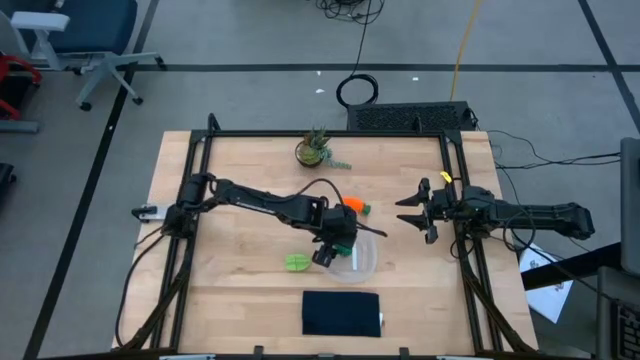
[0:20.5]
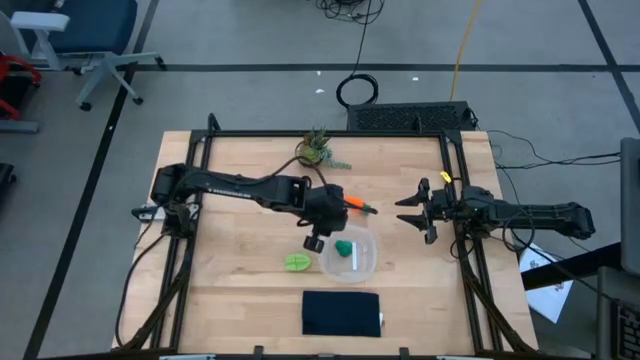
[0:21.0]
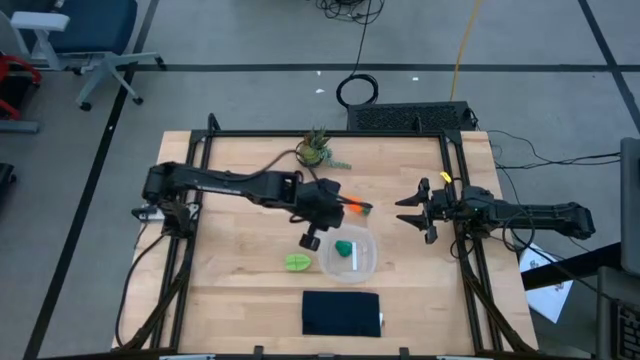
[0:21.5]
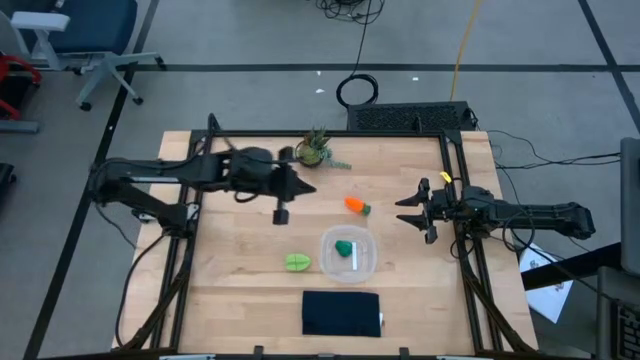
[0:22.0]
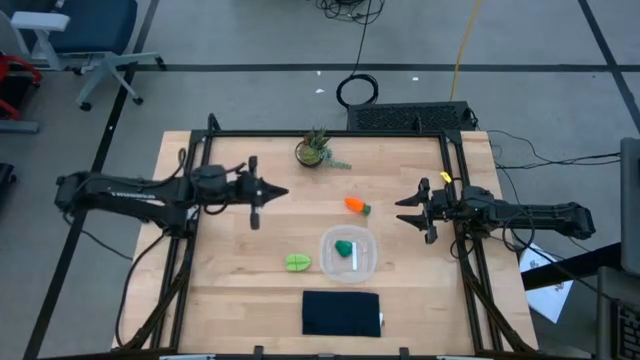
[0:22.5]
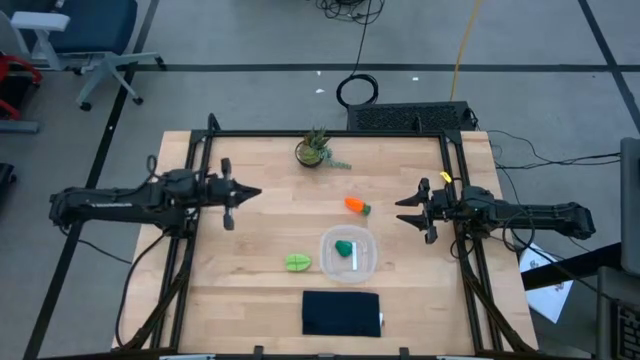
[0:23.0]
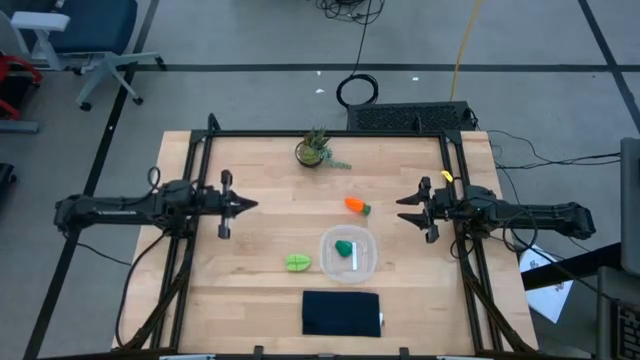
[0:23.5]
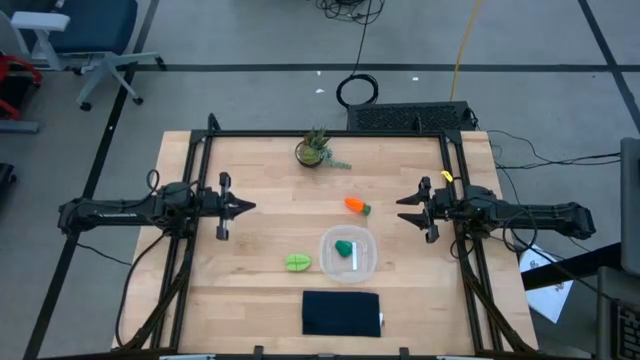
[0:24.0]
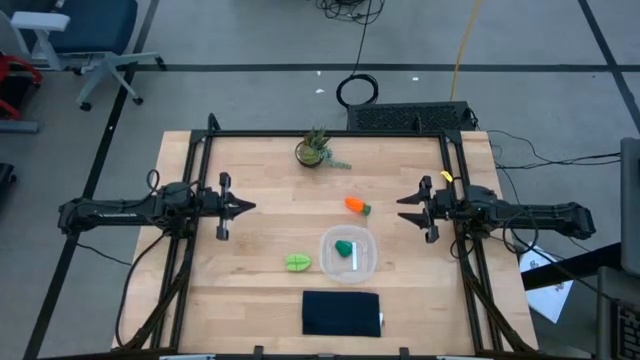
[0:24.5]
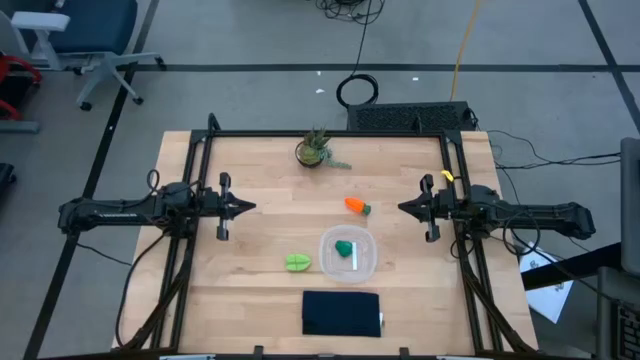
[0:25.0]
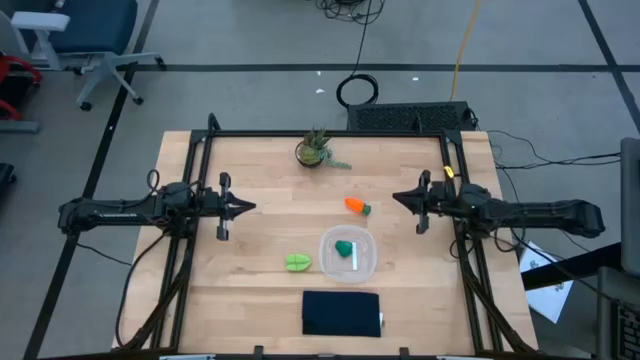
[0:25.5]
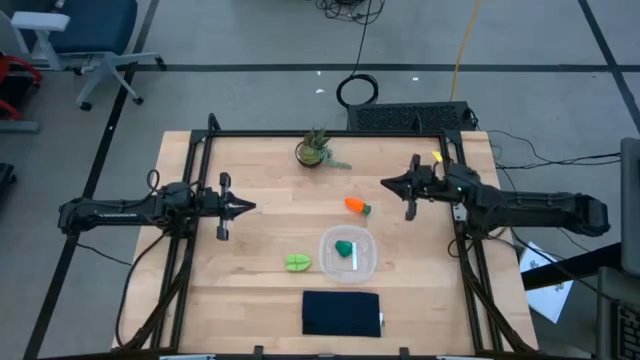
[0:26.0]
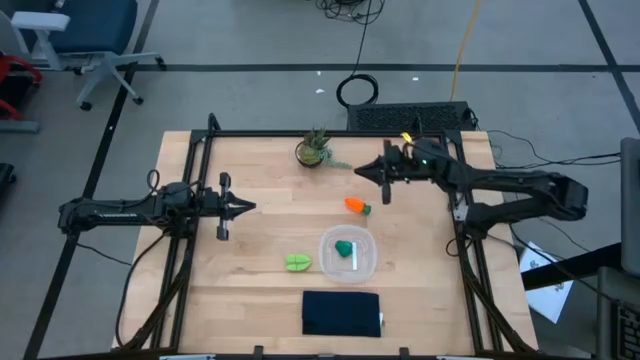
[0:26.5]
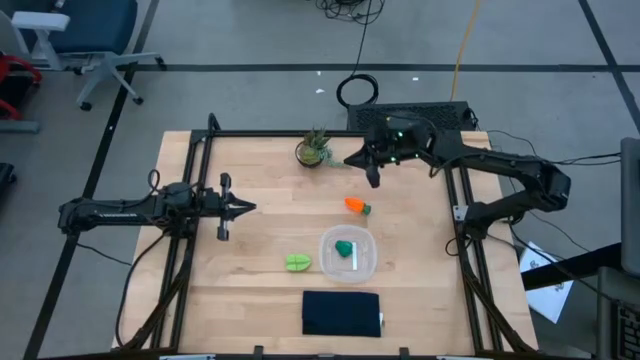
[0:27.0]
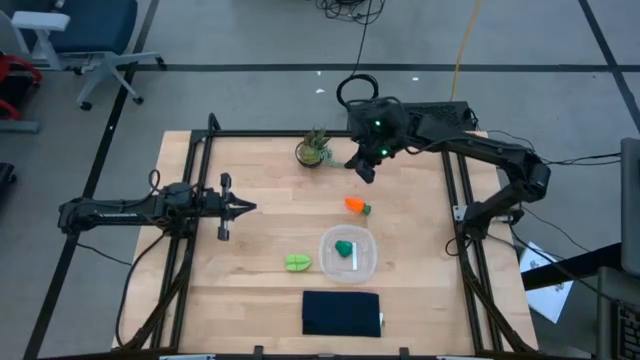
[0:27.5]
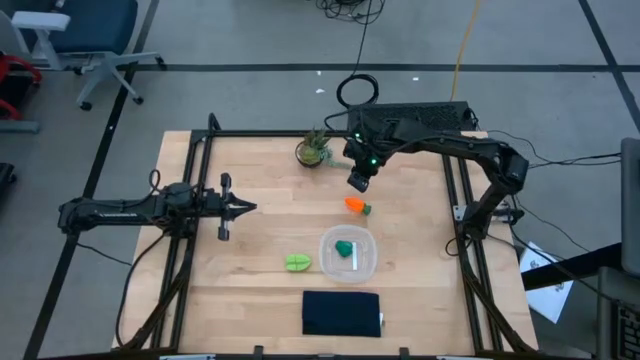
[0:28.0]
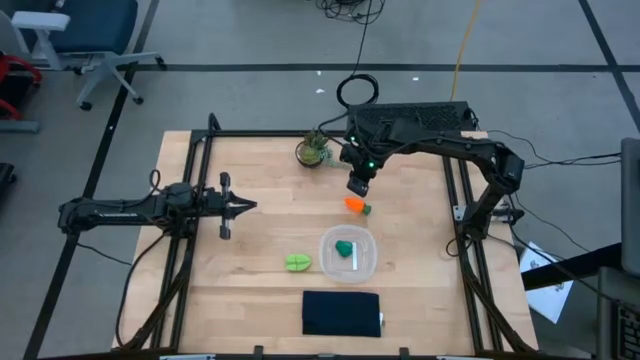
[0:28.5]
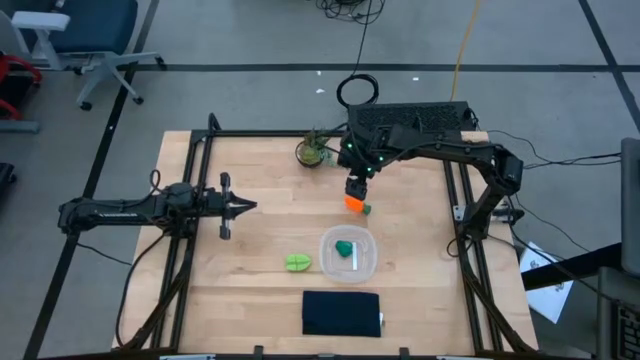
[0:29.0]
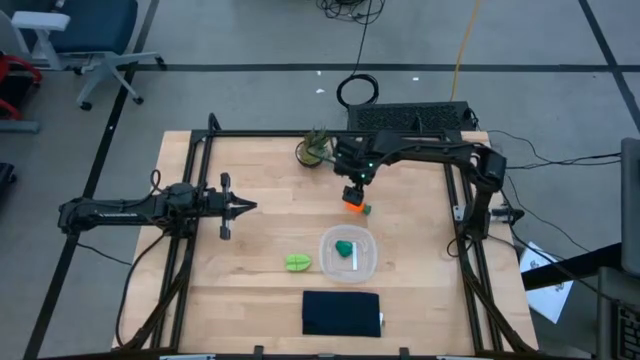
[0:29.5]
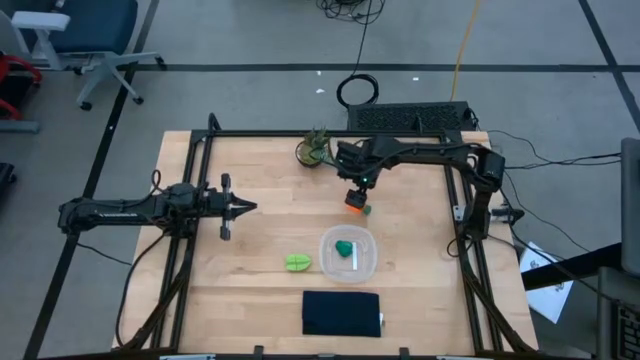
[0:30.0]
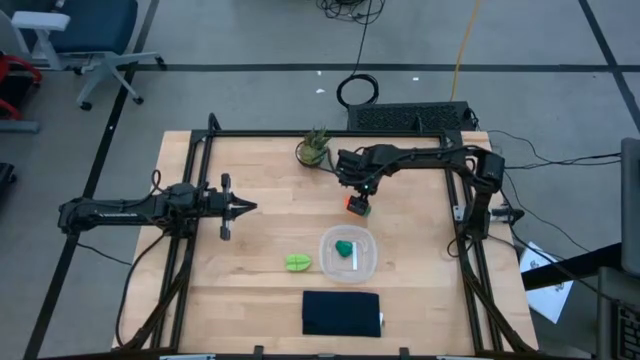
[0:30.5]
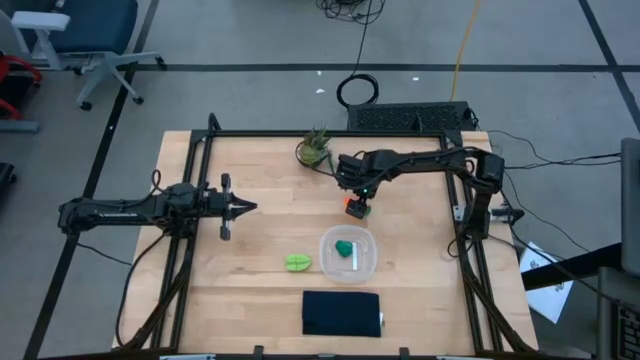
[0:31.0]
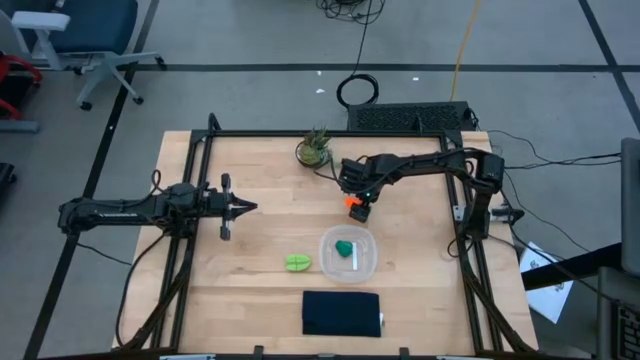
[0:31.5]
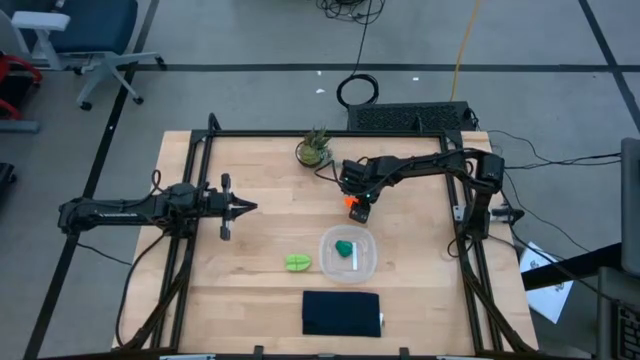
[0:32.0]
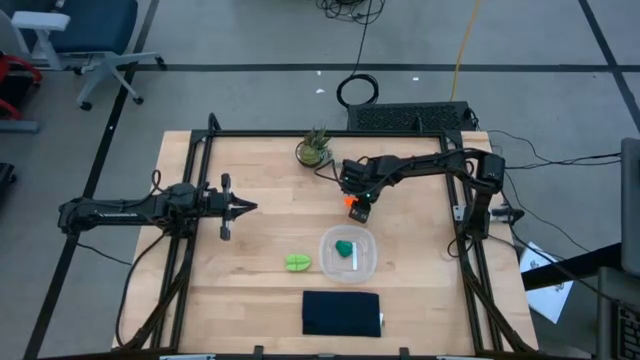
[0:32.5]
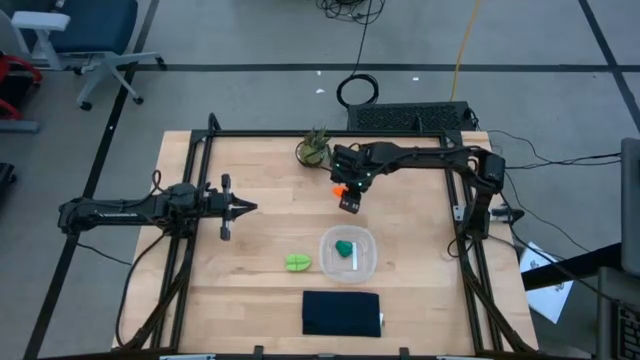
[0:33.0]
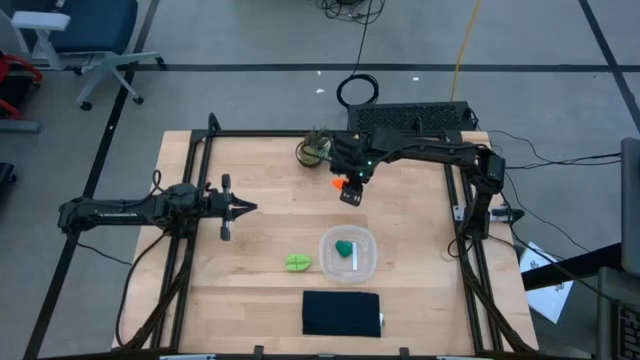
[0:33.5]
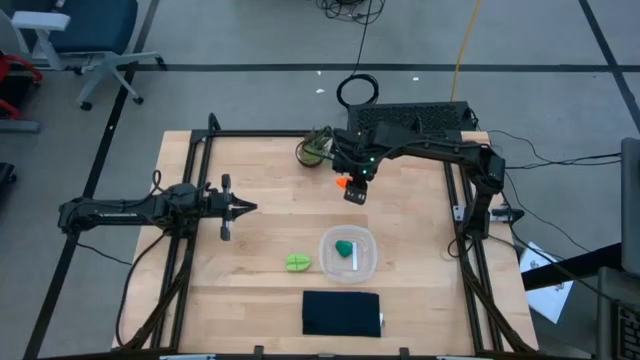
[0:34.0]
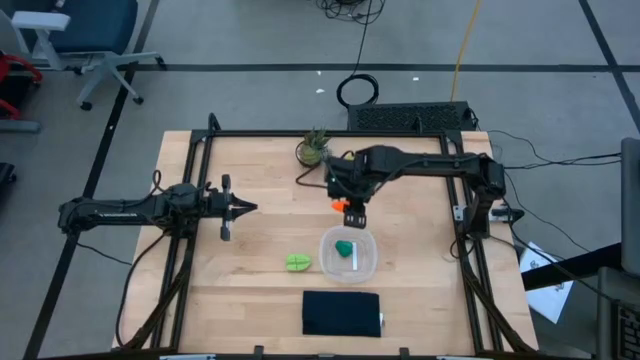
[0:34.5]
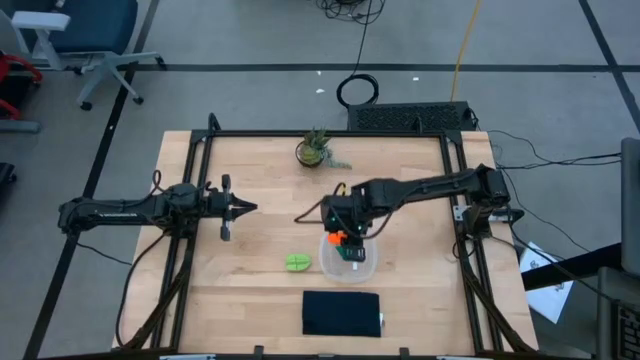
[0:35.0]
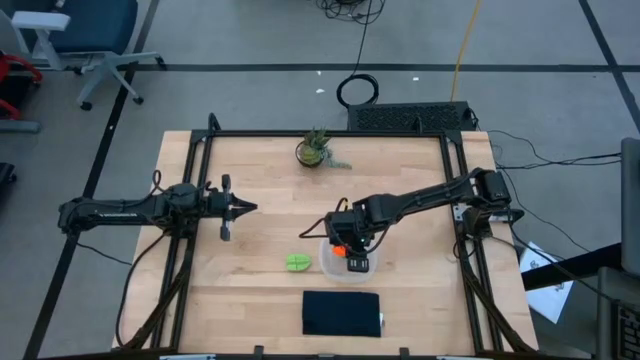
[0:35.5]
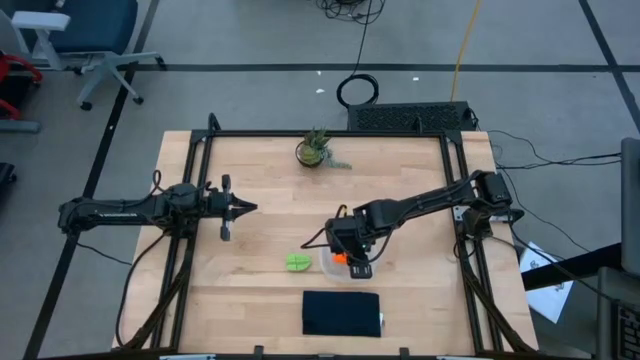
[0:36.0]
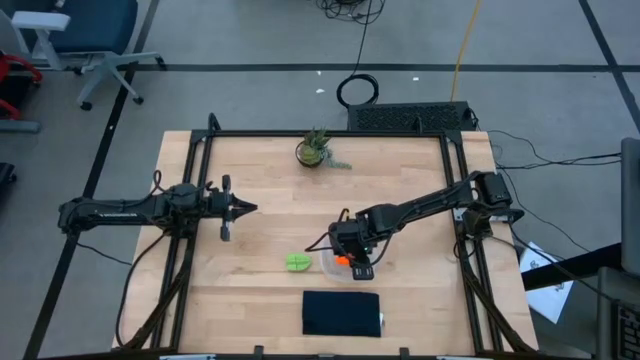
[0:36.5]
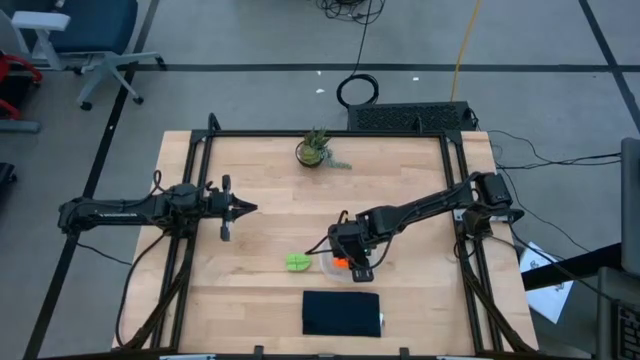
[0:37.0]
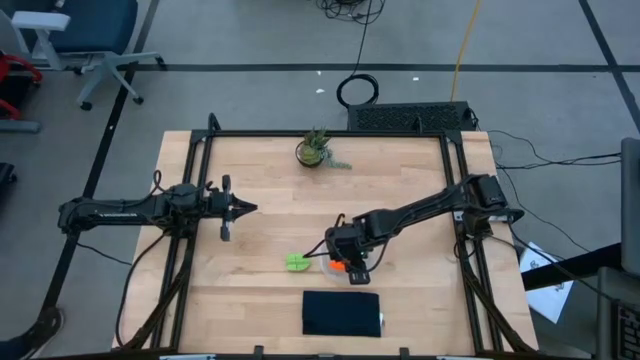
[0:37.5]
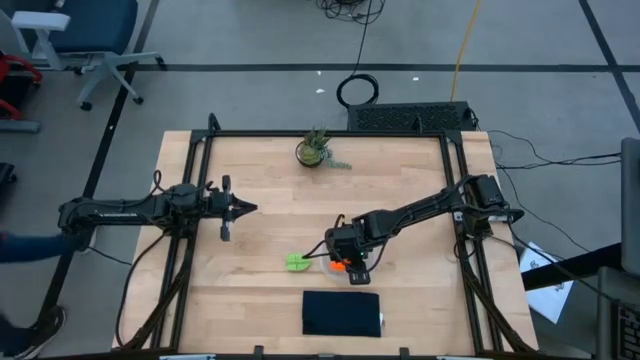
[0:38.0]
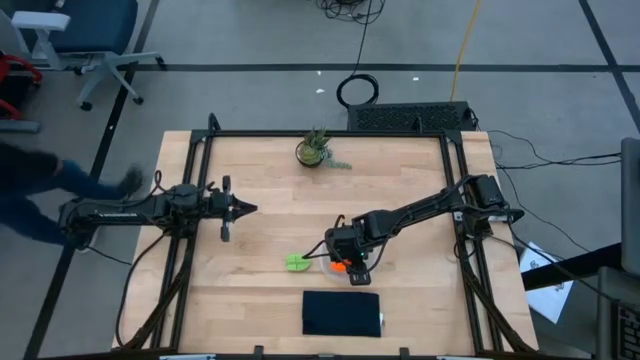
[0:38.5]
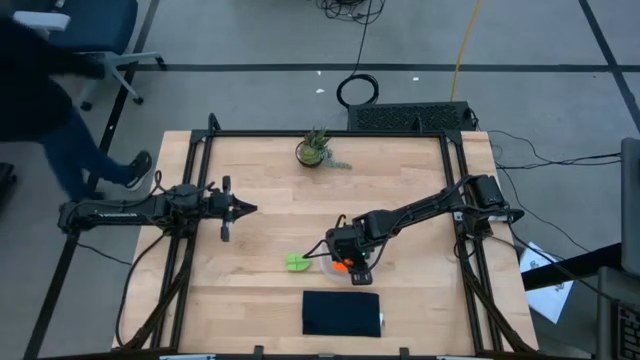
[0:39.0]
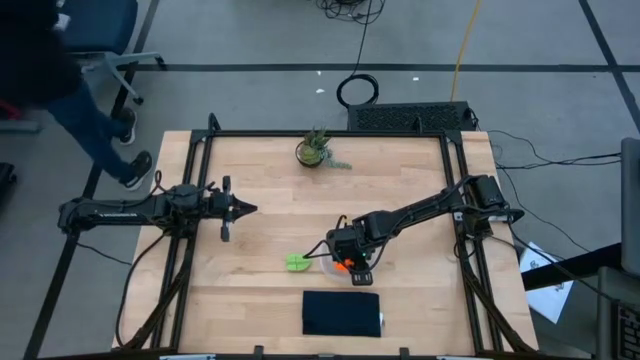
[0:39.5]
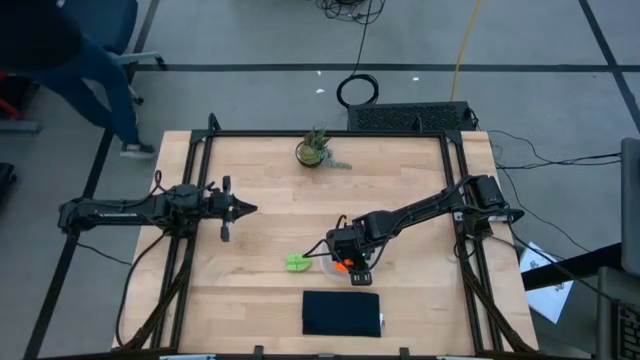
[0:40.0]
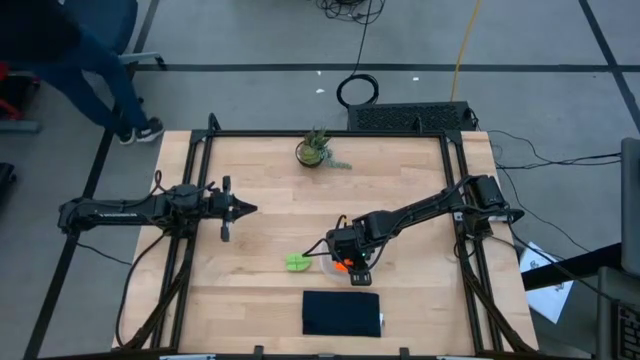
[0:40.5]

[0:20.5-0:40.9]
Task: Pick and placing Produce into tupperware
Put the orange carrot into the transparent container

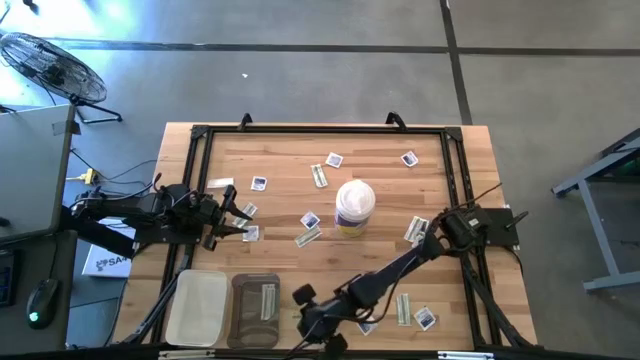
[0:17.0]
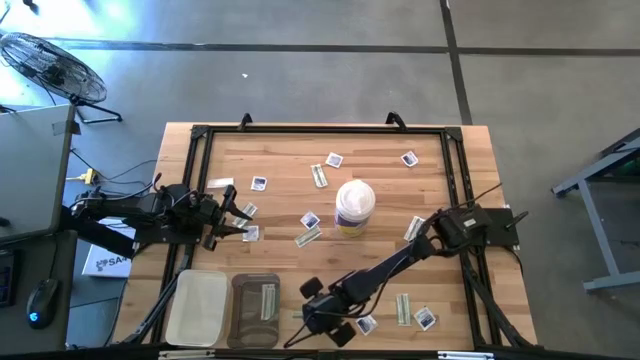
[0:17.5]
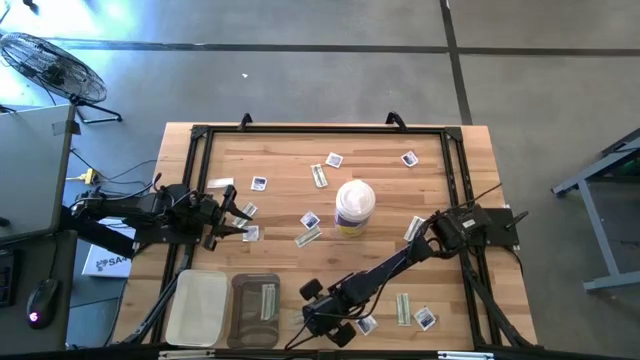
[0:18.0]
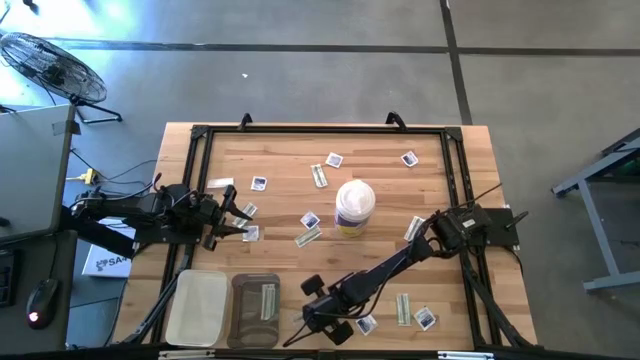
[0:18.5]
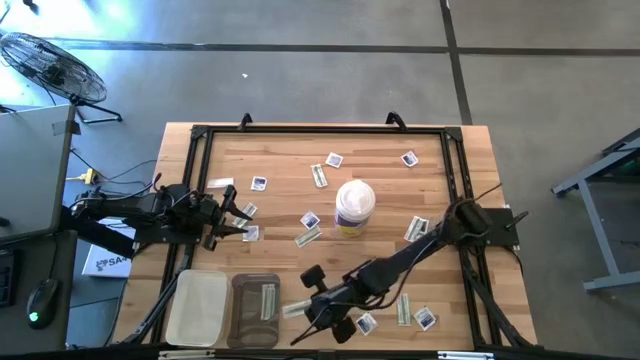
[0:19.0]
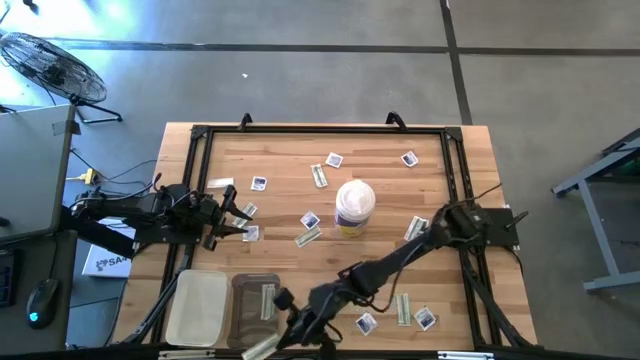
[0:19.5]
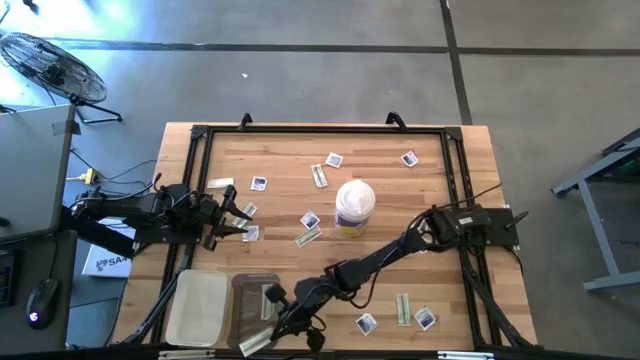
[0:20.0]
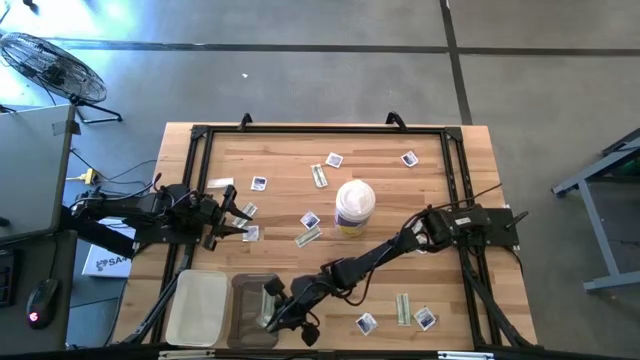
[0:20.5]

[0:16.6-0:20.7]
Task: Pick & Place First Aid Supplies
Put the bandage into the black transparent bin
